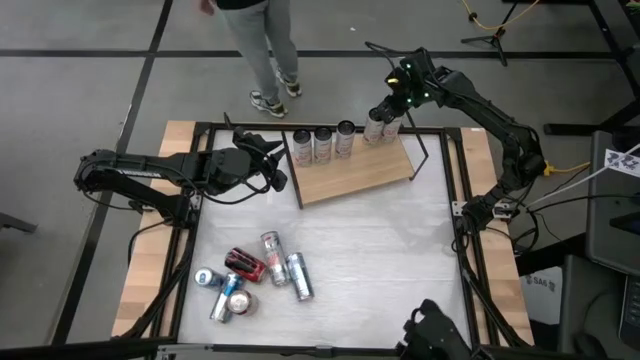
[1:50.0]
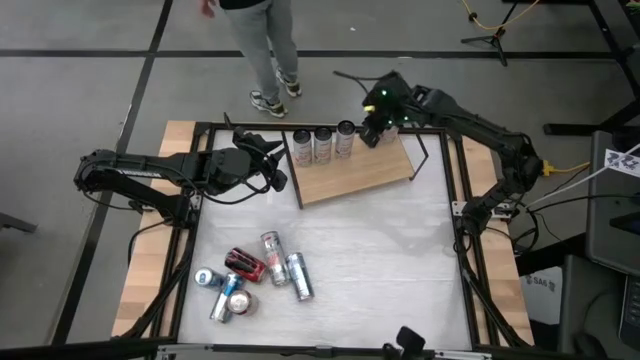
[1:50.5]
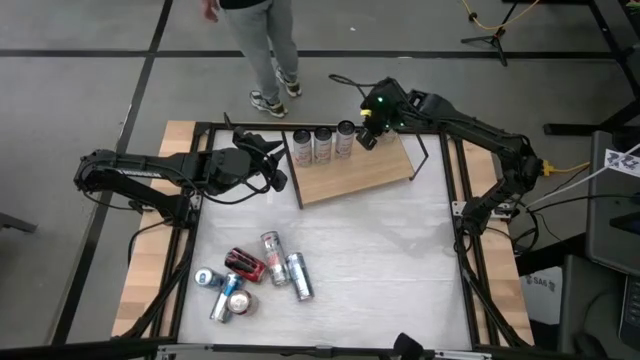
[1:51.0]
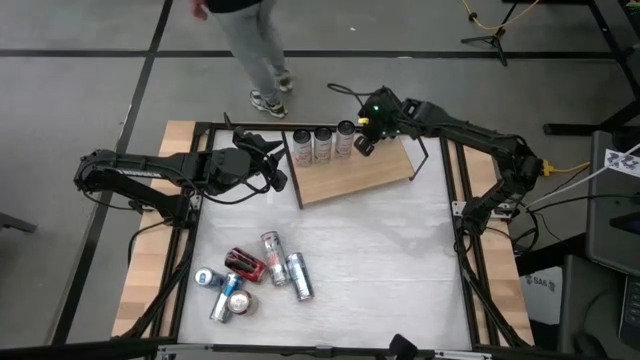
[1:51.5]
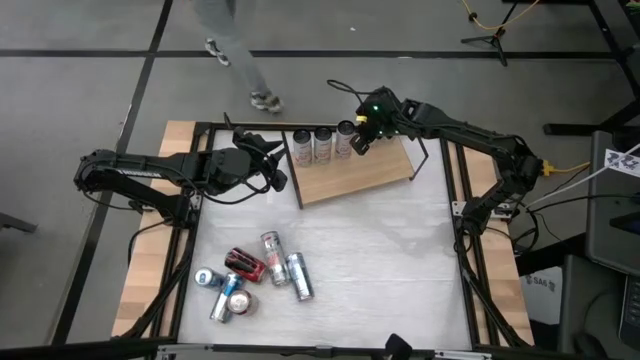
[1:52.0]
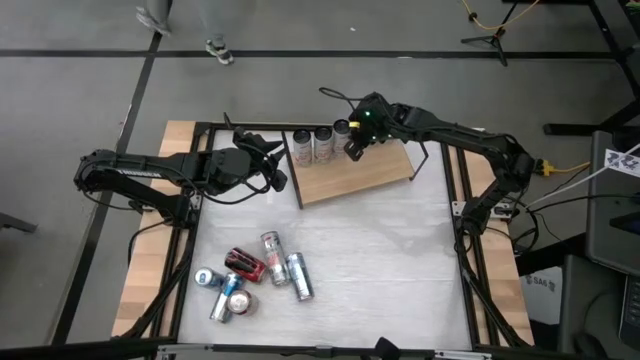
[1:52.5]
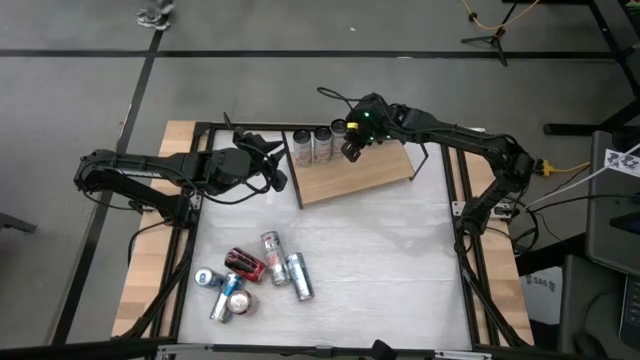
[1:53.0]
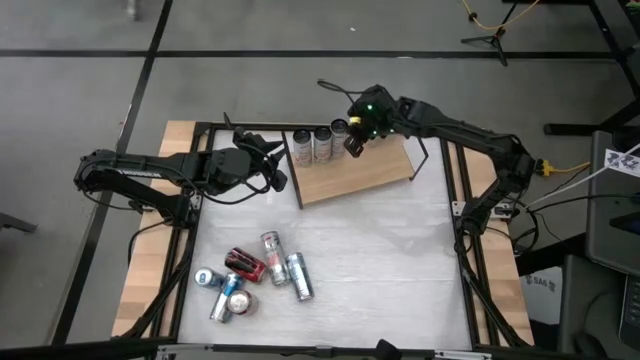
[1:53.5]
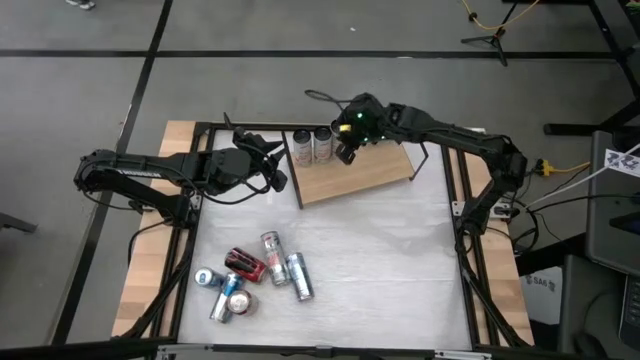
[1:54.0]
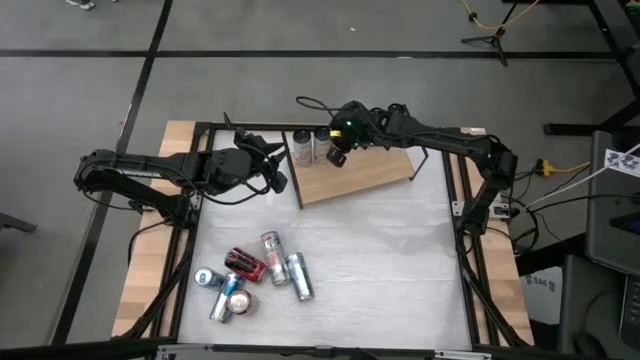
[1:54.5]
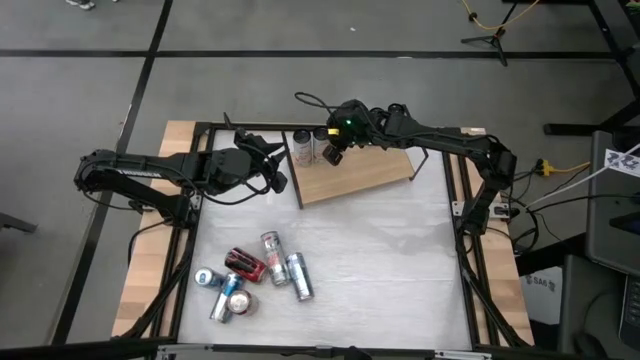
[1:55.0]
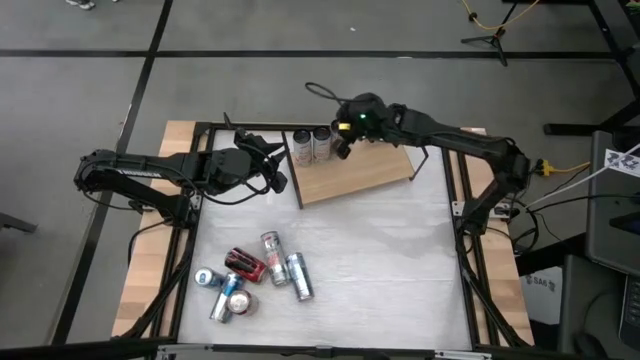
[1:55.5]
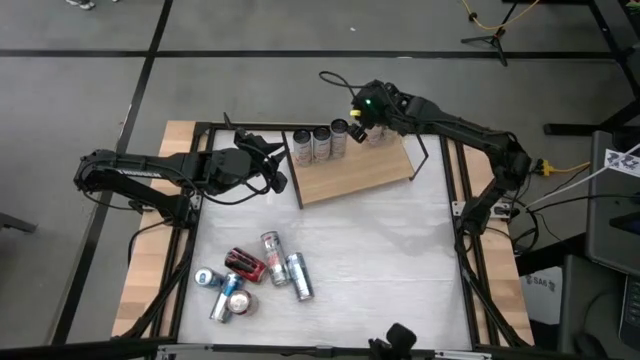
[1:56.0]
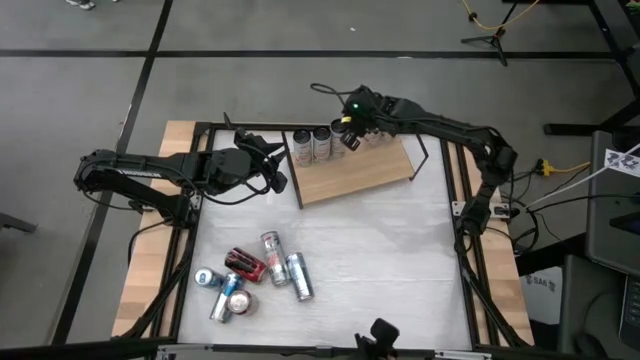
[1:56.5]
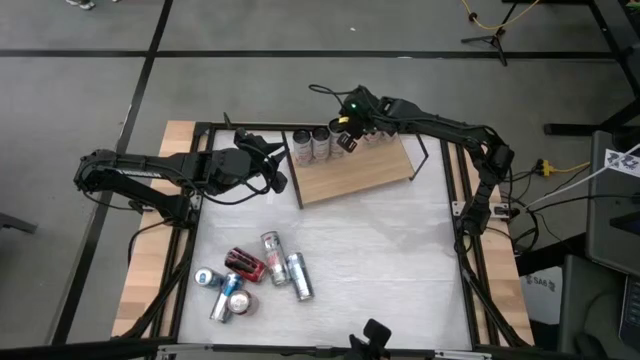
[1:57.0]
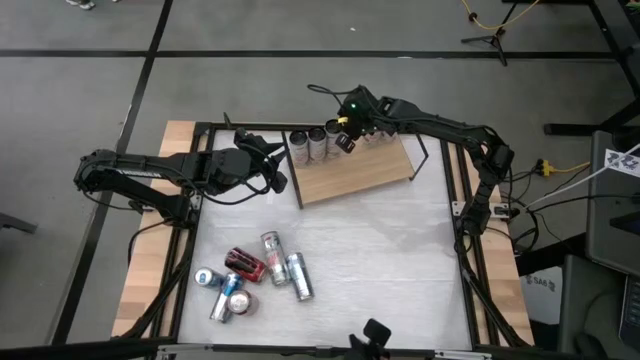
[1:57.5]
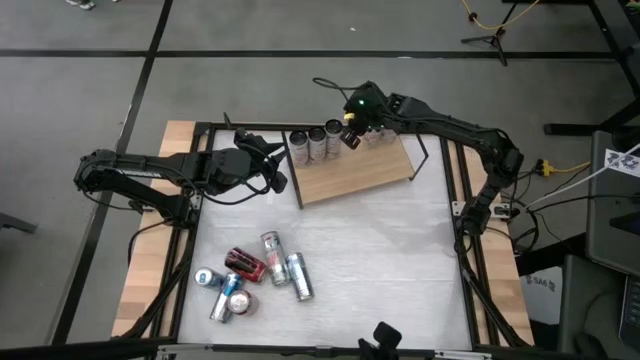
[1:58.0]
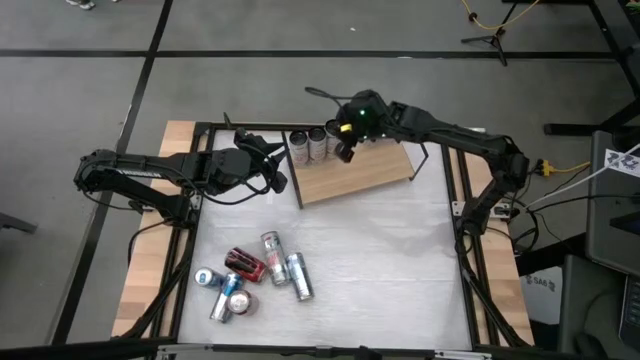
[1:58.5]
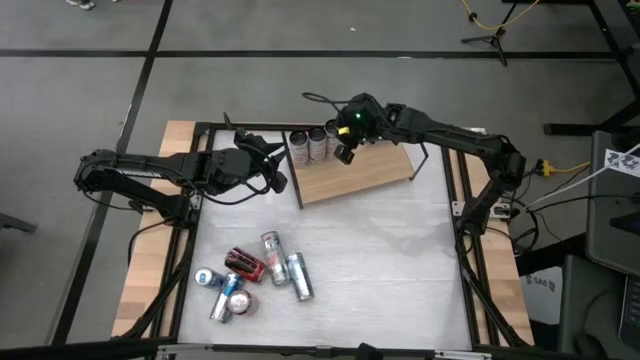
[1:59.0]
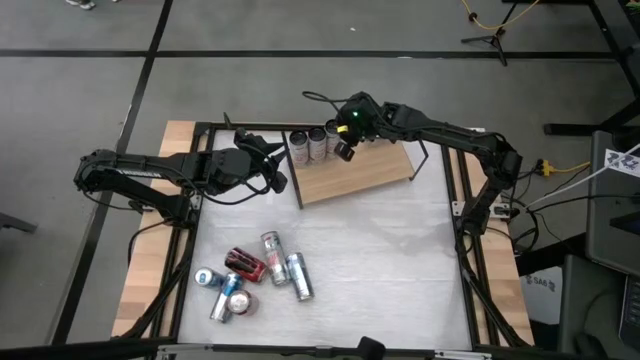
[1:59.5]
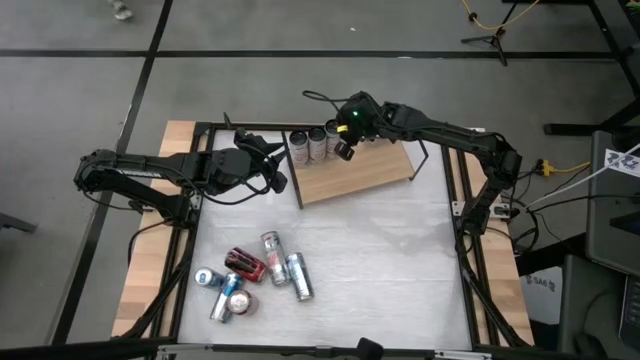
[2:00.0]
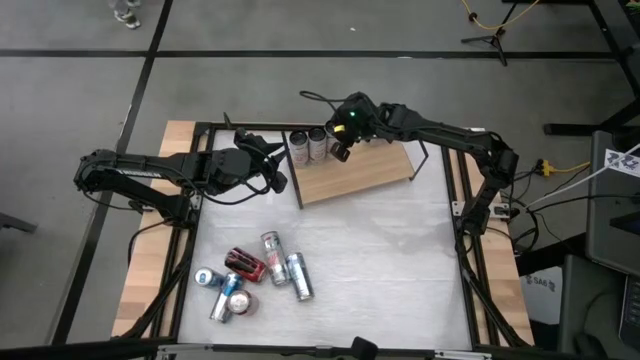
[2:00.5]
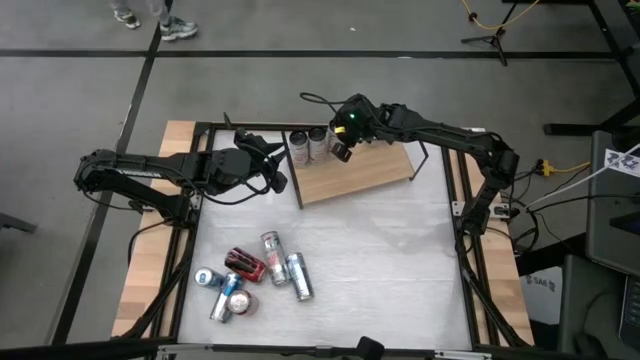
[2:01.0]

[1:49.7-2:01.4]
Task: Place canned beverage on shelf
Adjust the white pink soda cans on the shelf

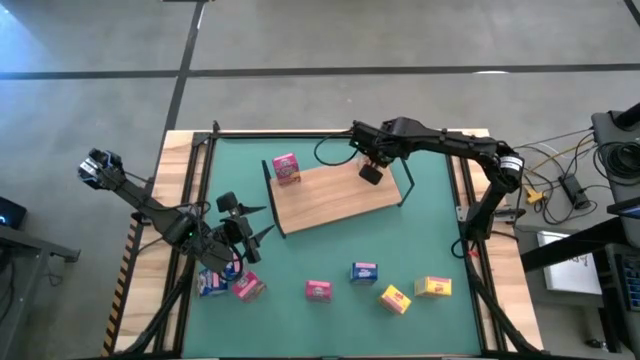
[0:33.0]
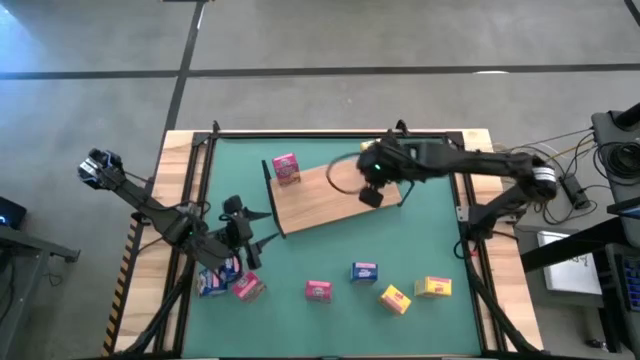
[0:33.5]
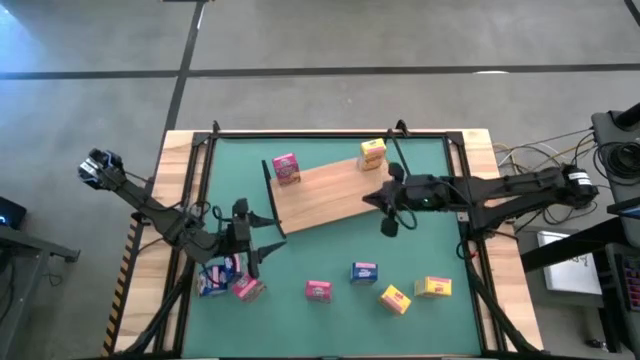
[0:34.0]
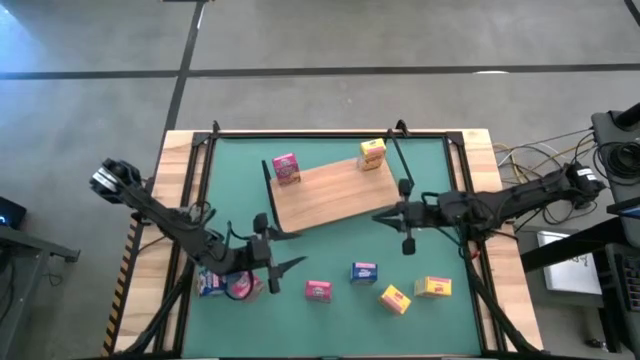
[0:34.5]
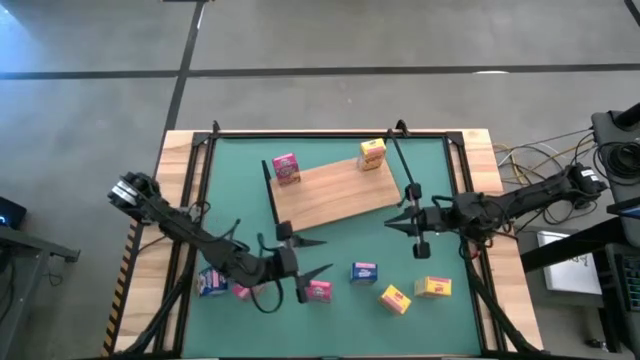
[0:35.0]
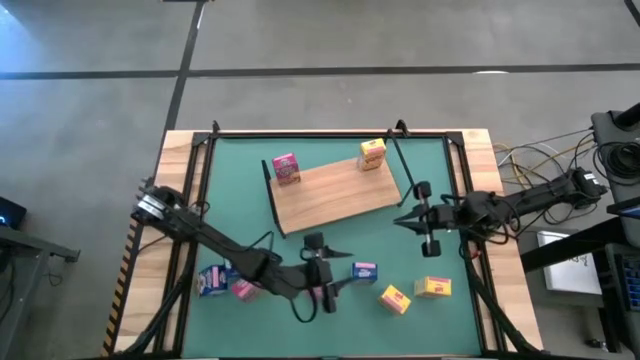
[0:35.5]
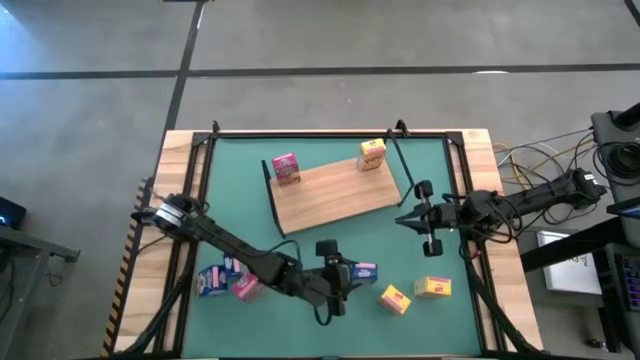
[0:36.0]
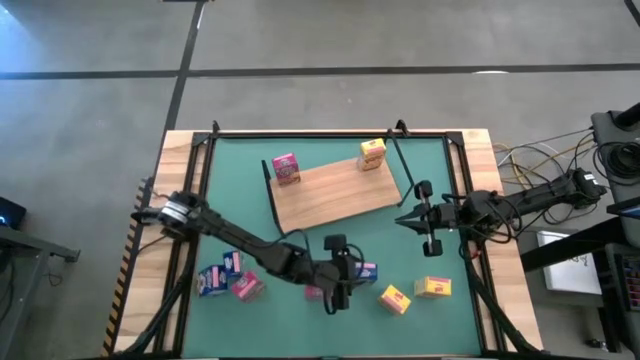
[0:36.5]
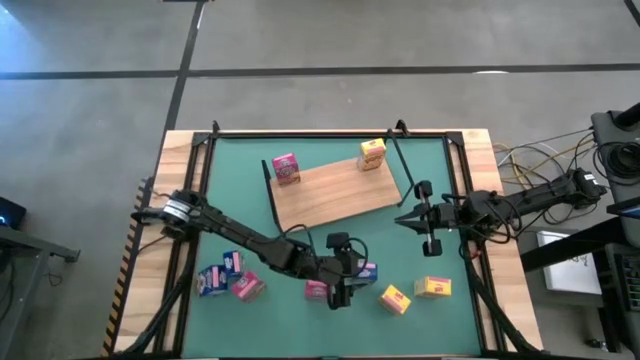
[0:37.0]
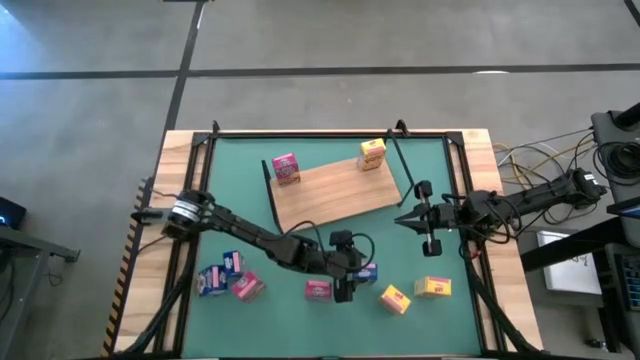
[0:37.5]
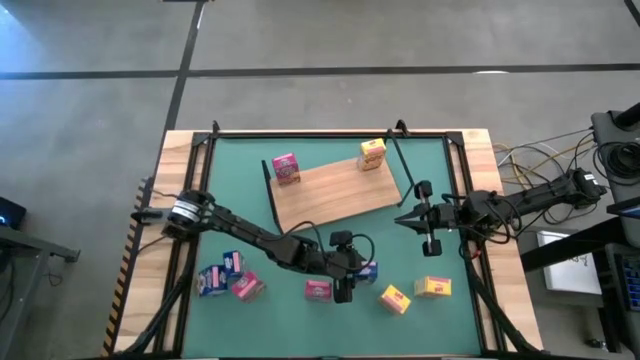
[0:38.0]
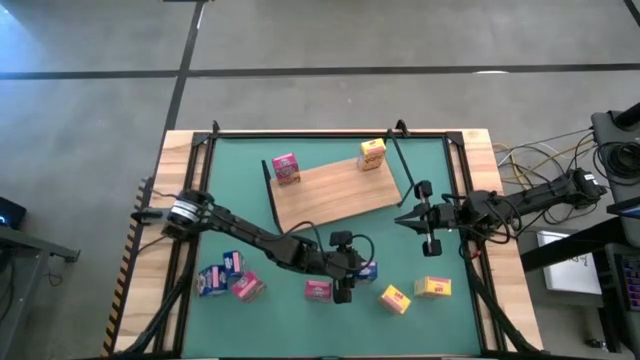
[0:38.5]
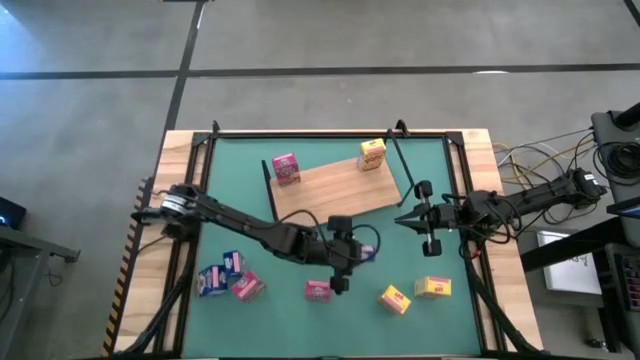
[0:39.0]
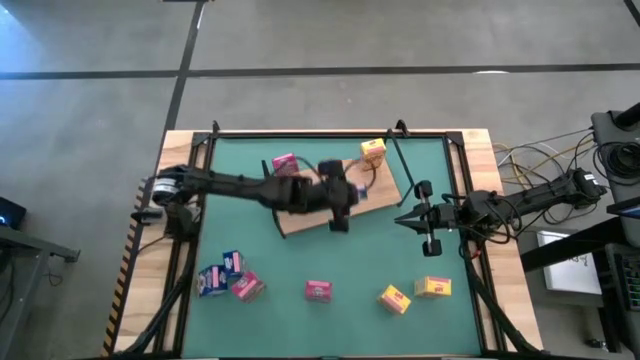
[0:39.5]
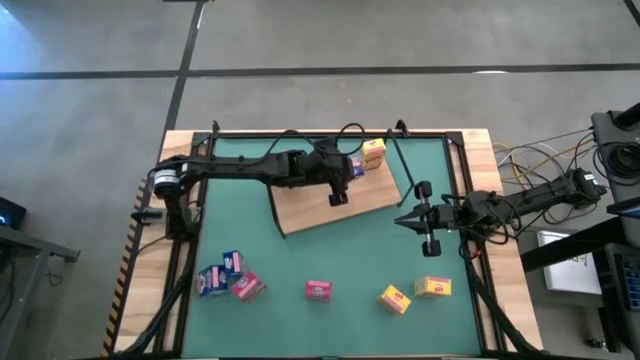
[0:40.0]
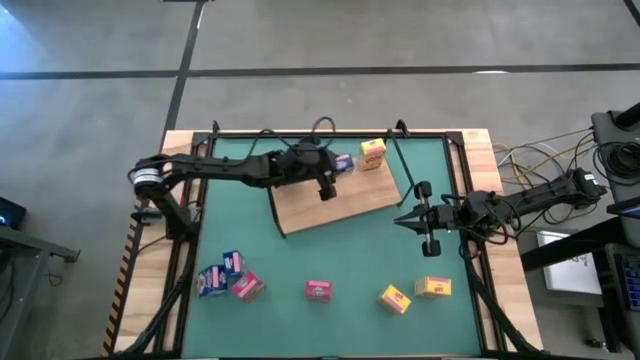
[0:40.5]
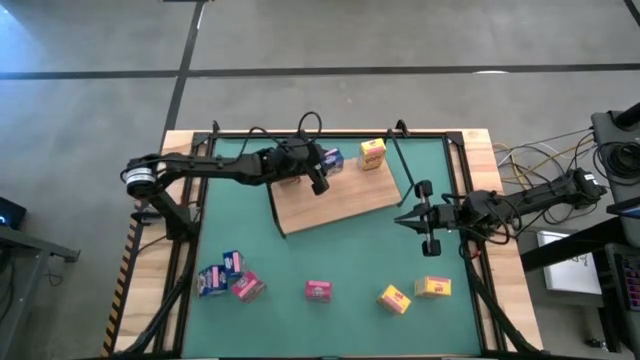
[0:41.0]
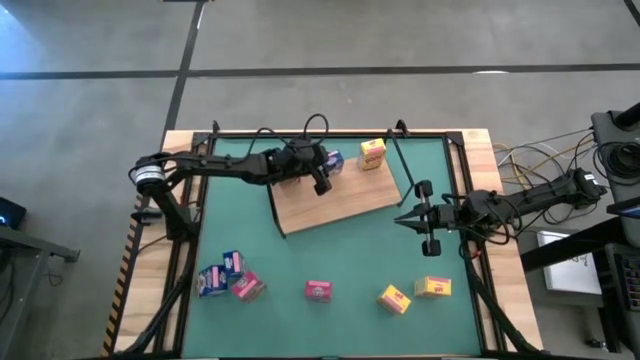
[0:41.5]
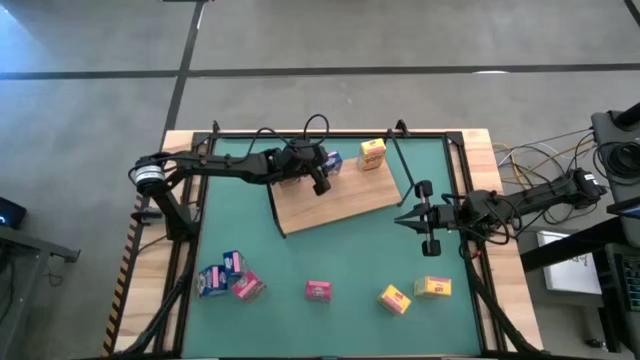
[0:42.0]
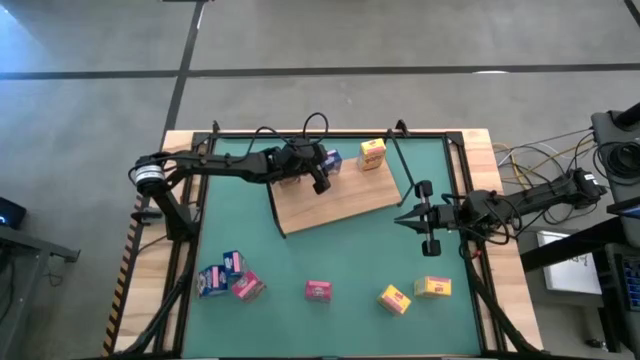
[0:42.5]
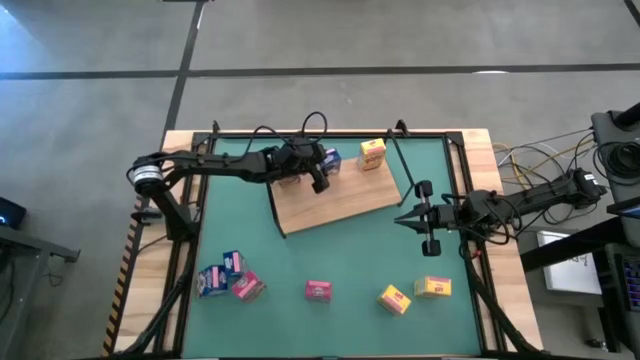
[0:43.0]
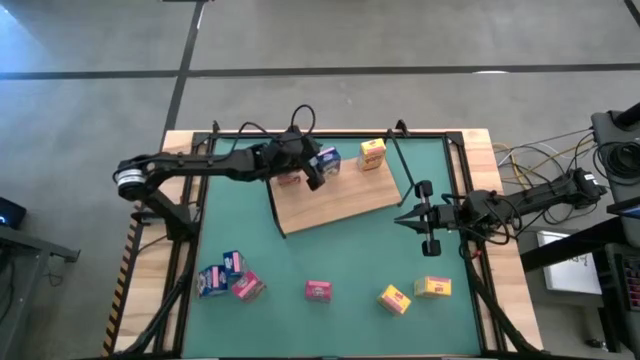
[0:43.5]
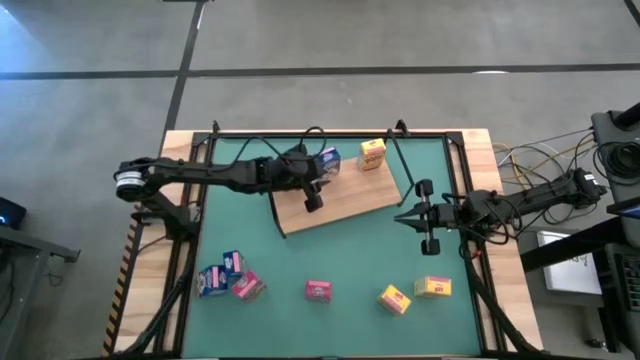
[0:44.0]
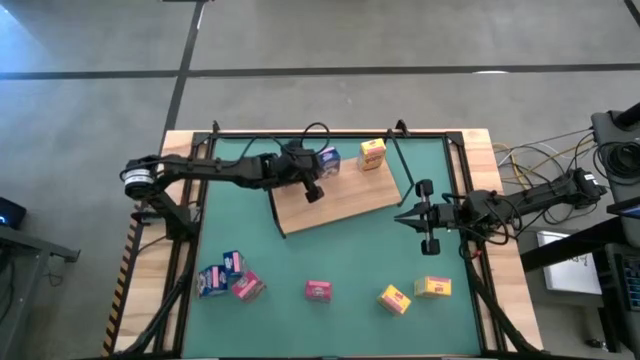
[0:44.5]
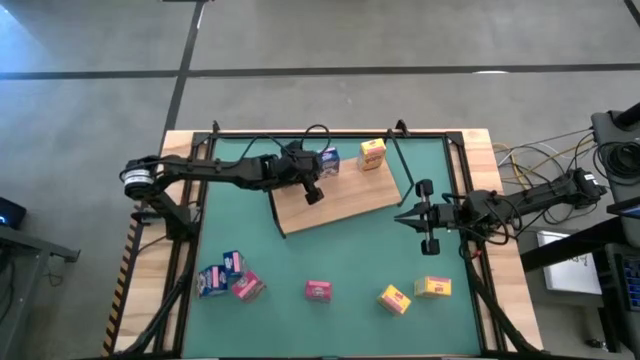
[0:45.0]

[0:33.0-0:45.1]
Task: Stack cereal on shelf
Put the right blue cereal box on the shelf
